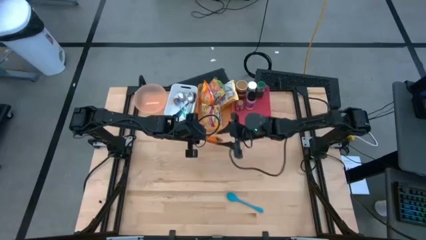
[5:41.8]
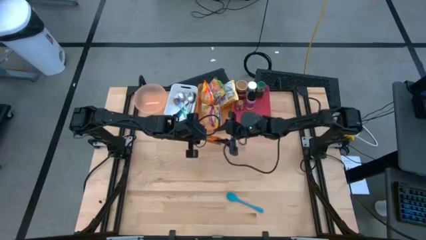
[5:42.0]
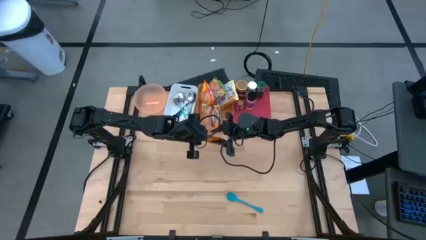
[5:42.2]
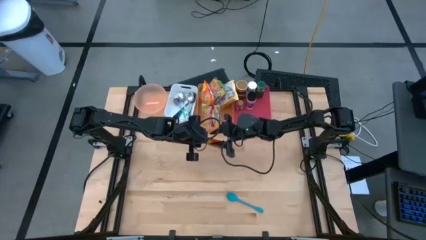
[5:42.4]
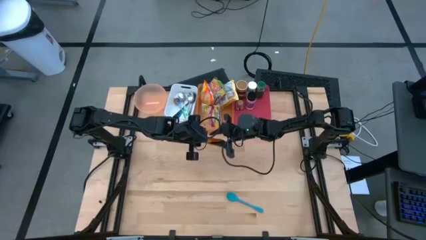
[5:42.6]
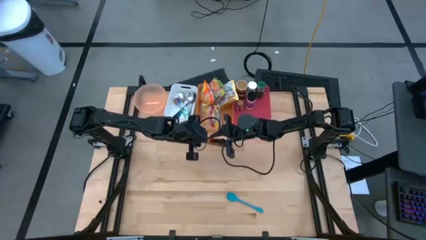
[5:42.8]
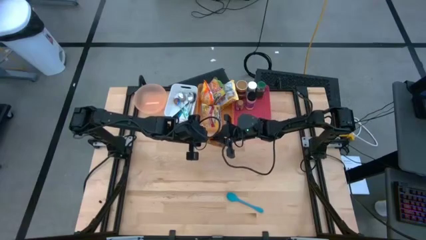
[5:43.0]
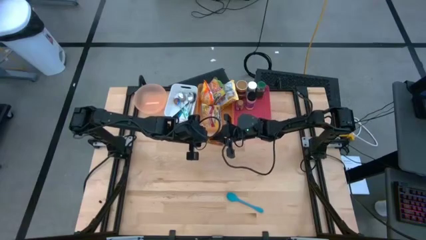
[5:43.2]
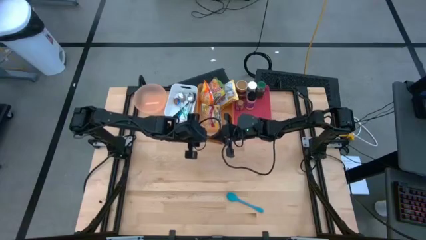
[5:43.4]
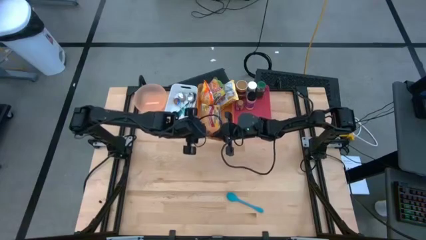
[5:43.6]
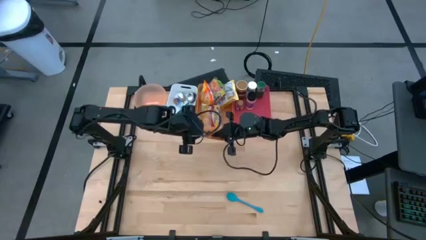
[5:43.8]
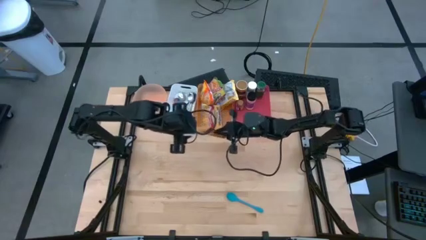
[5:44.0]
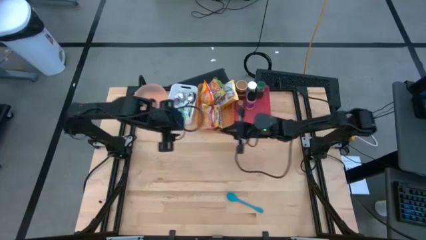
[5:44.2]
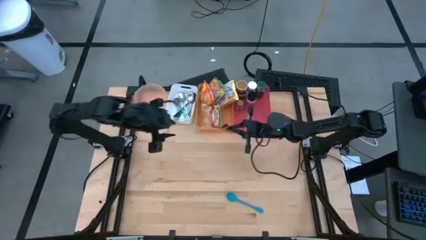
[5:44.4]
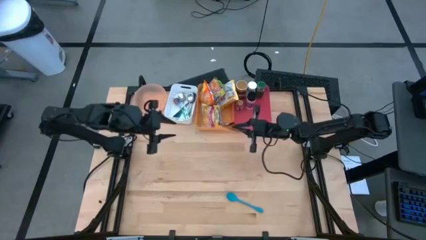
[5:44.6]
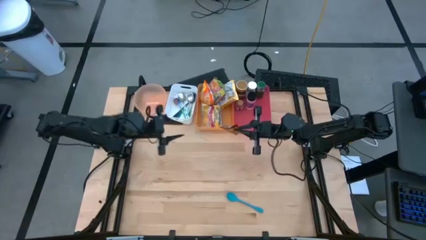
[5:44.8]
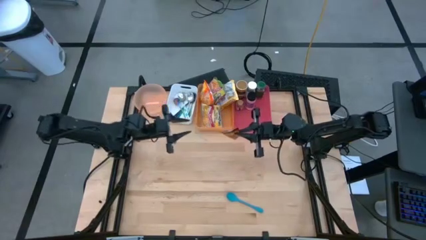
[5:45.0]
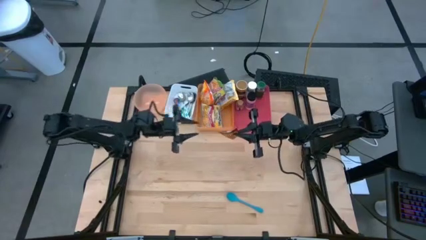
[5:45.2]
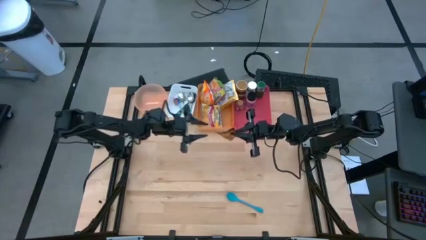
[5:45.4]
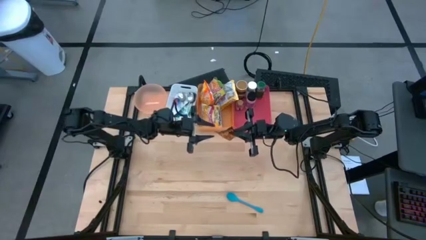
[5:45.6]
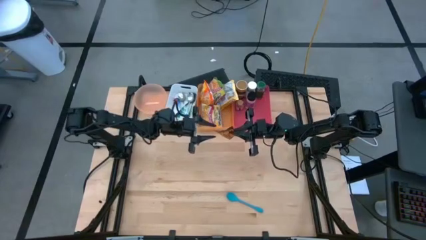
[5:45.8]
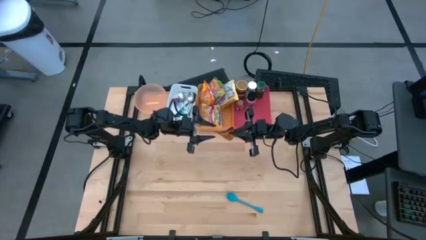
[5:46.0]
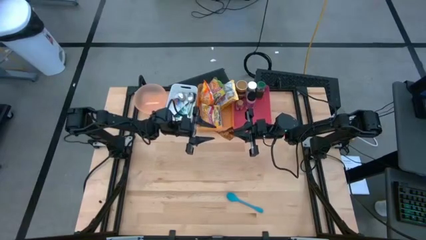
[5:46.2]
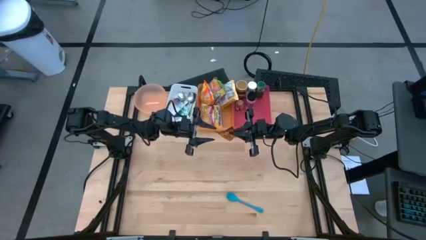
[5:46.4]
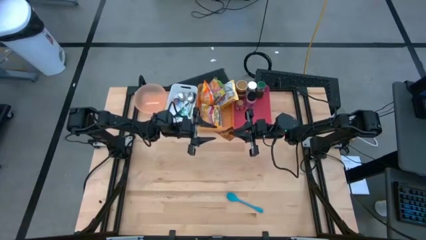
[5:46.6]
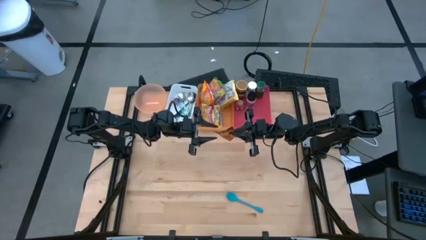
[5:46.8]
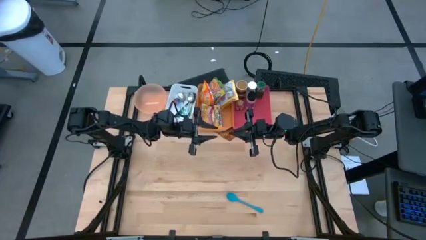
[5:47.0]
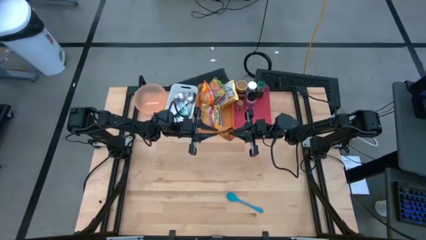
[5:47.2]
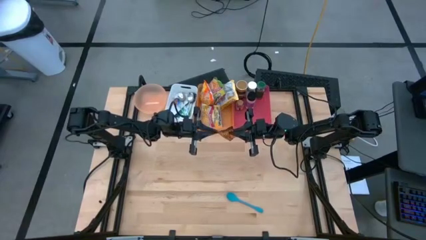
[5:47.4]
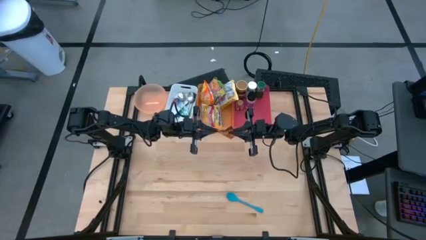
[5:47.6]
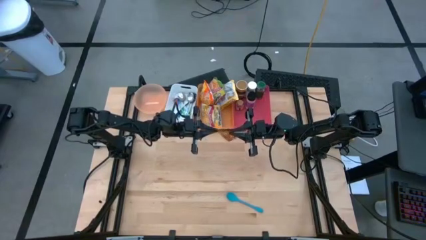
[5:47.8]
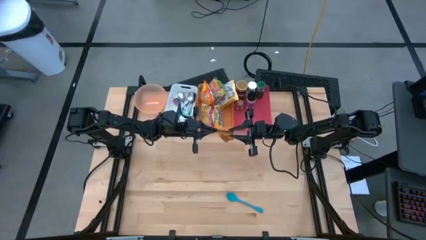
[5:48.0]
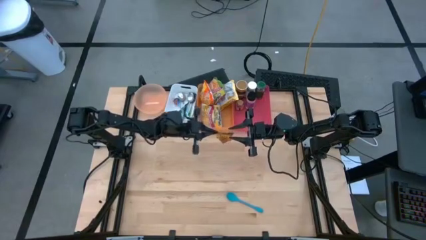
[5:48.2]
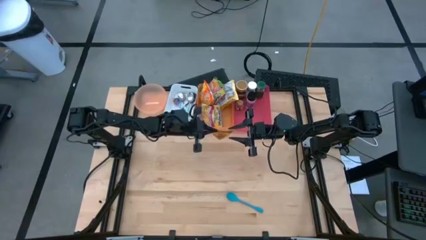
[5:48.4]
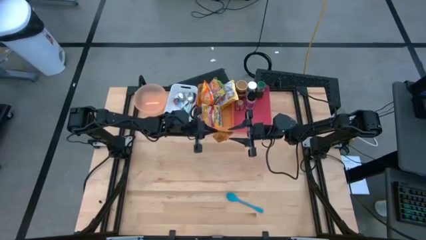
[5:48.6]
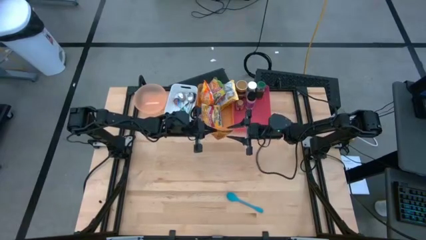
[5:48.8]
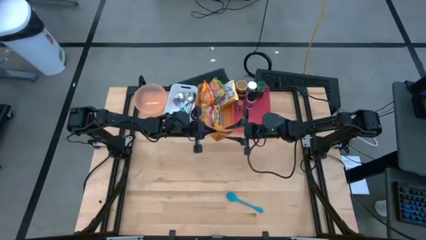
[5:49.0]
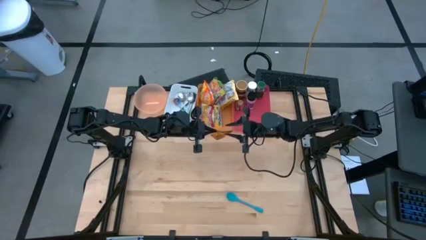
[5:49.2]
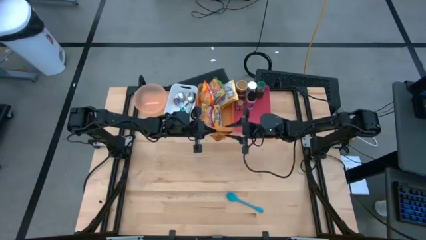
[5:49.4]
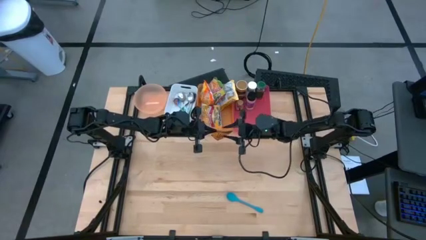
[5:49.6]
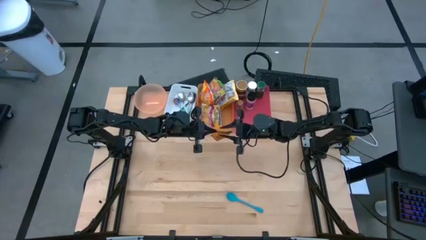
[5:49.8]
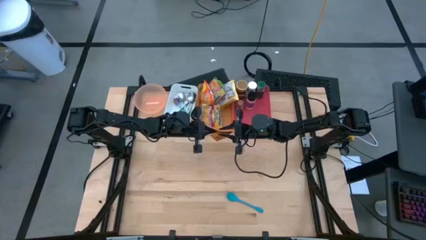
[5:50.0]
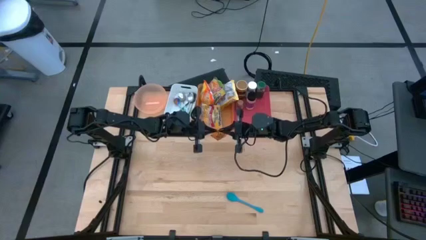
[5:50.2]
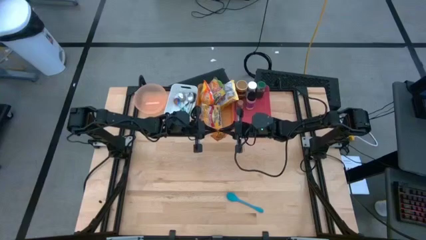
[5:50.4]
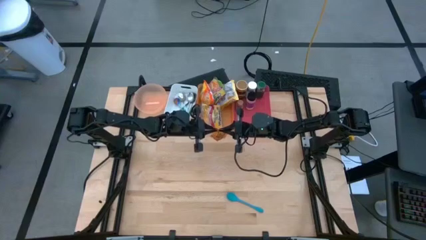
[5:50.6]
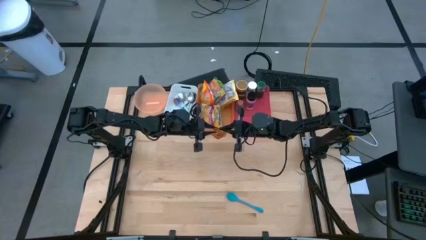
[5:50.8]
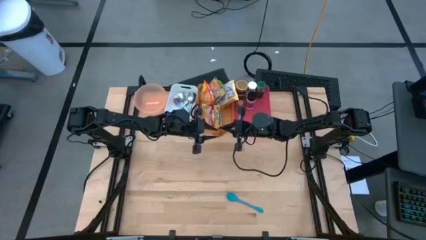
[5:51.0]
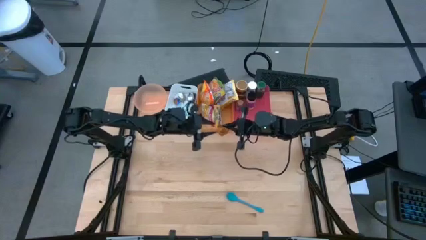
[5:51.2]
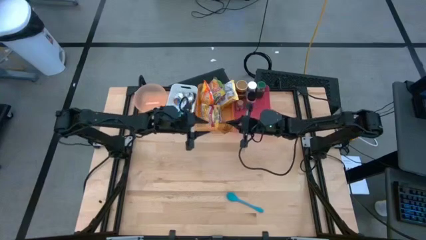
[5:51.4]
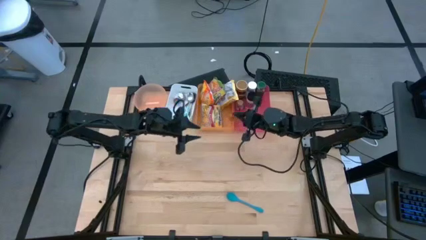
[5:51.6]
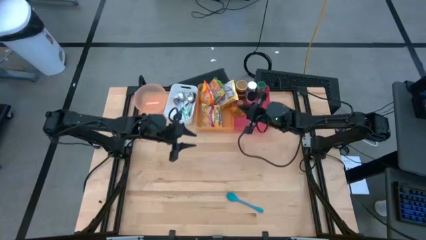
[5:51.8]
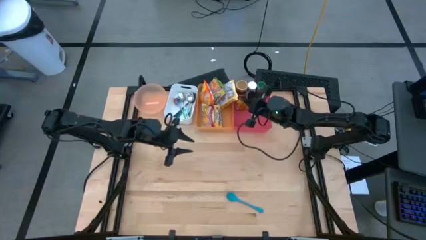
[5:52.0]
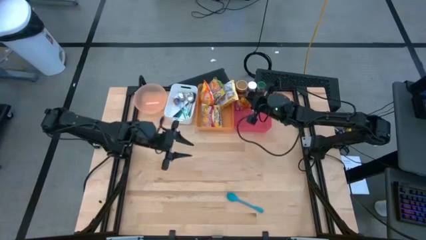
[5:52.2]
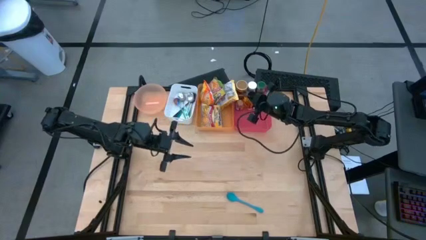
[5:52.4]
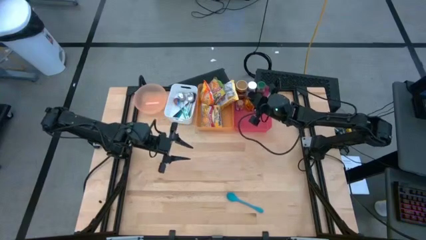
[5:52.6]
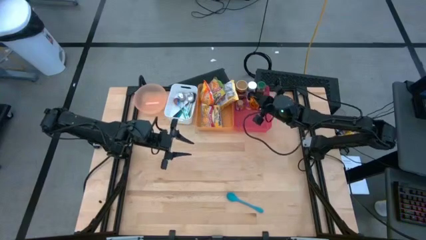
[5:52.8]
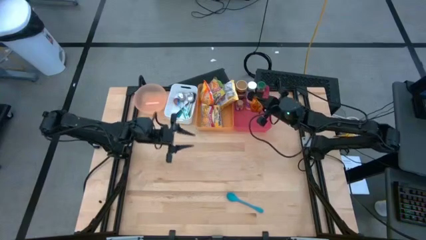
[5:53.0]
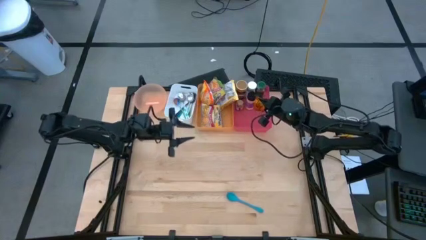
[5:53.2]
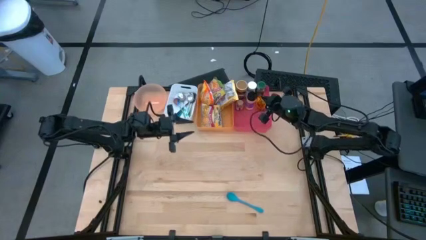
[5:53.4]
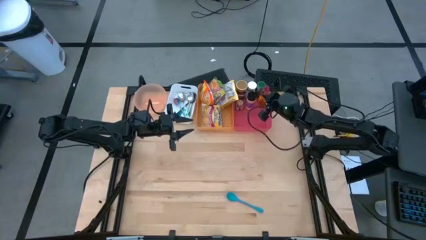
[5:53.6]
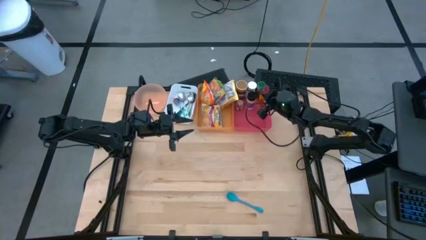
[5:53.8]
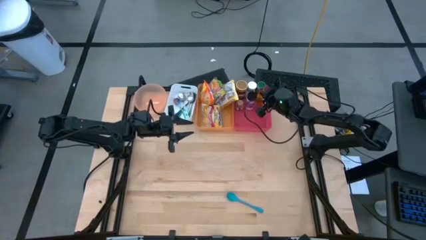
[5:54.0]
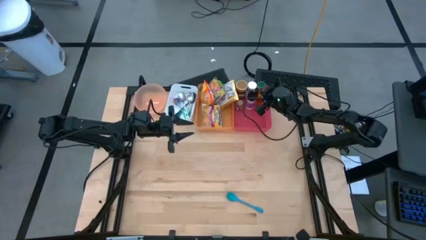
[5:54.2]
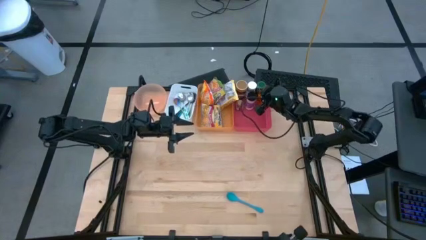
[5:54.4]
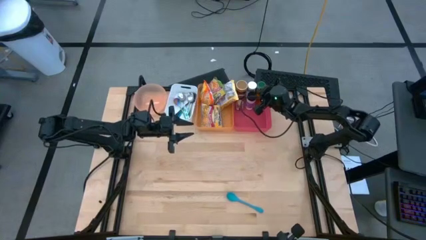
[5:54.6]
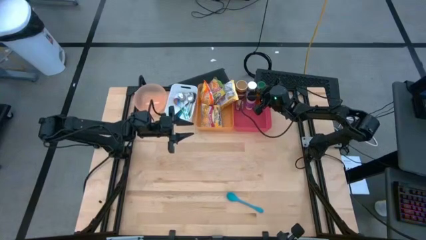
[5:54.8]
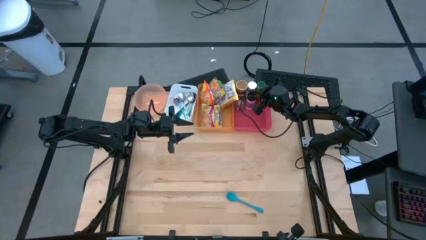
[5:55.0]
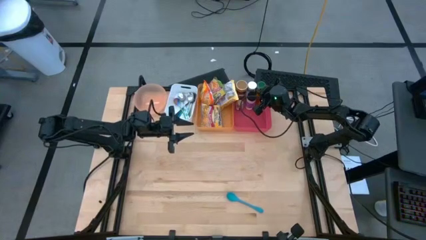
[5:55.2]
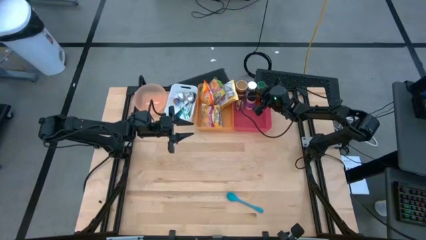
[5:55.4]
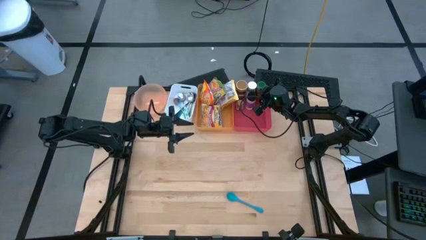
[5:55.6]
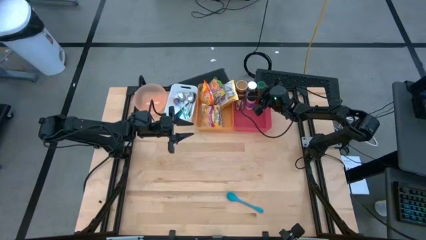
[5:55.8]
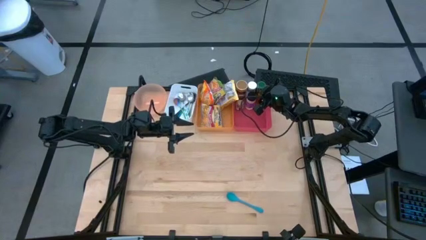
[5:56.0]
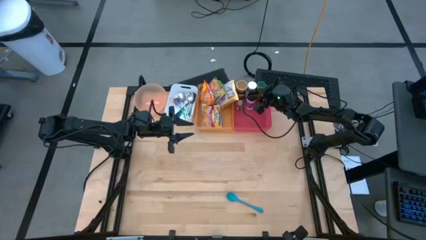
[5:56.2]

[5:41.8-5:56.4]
Task: Pick & Place Food Item
Put the orange seasoning pack into the red bin

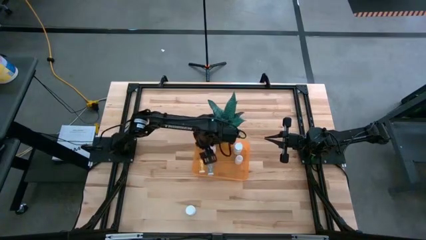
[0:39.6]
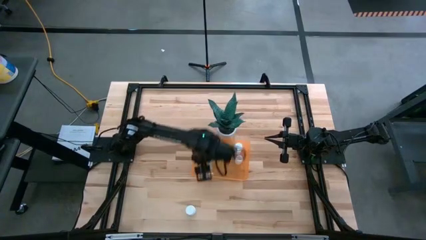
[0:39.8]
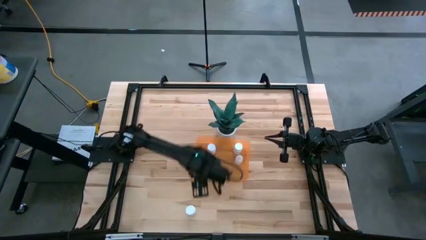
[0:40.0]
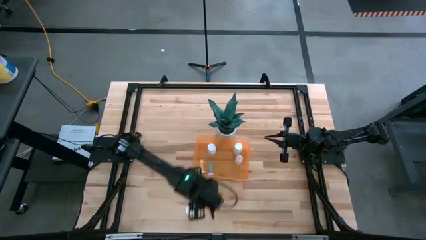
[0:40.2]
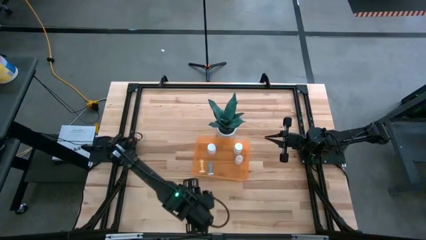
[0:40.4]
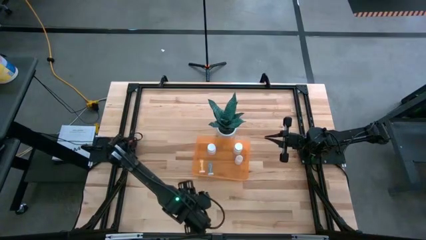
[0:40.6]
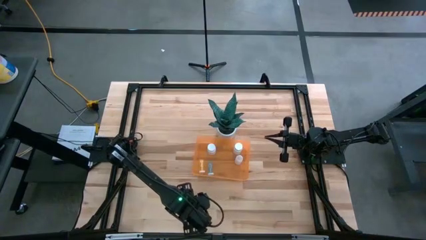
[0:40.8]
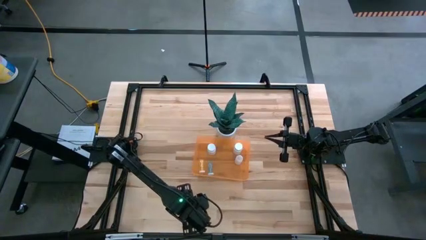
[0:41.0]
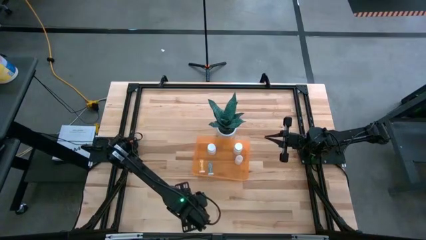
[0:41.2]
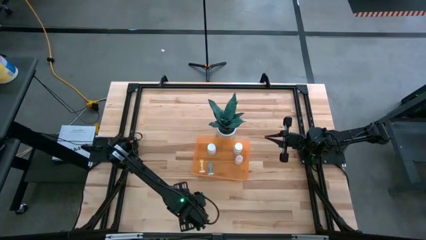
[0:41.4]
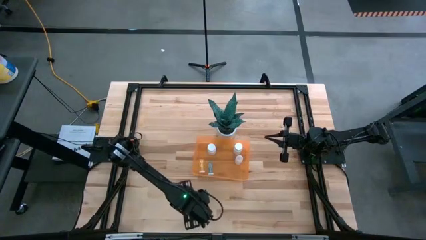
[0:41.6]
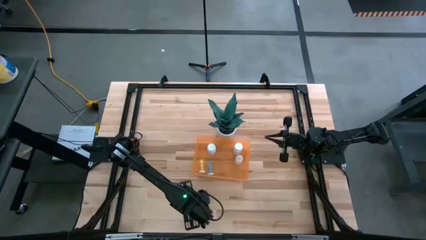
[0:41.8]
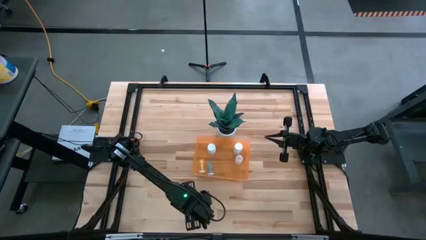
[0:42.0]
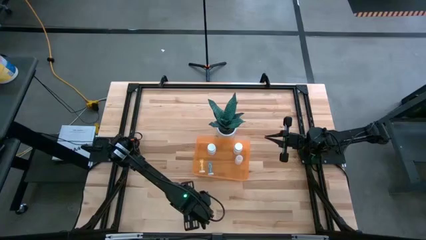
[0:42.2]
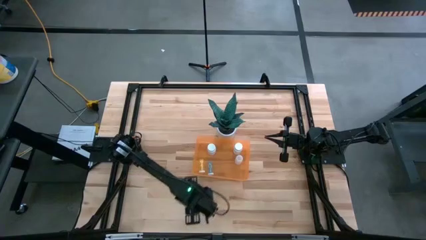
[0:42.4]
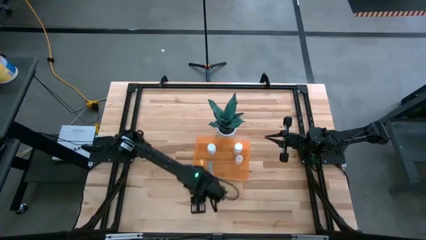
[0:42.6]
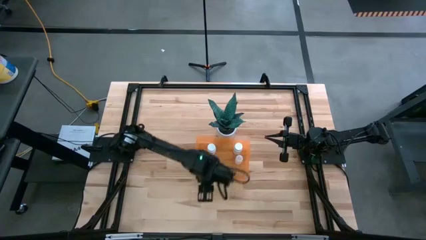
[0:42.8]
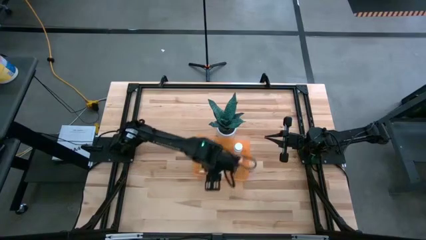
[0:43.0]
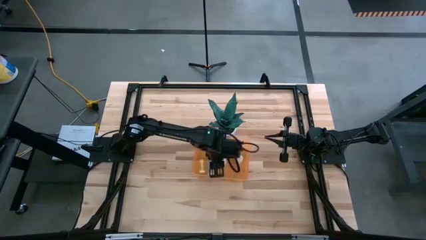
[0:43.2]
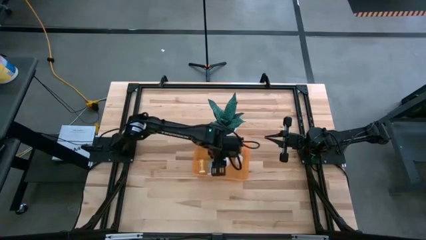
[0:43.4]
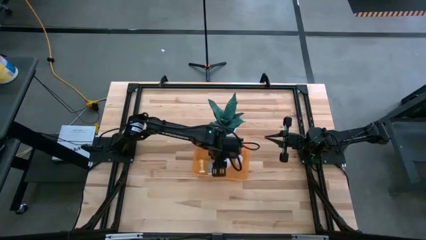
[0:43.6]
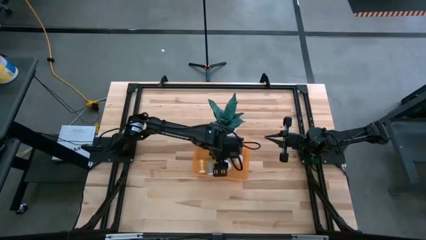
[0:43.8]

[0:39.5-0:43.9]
Task: Pick and place pill bottles into a basket
Put the white pill bottle into the orange bin
